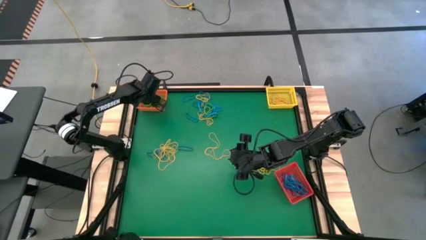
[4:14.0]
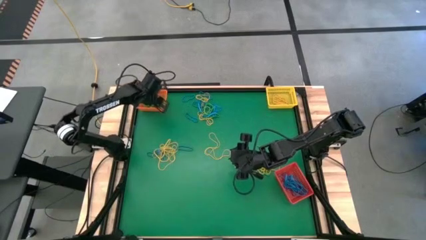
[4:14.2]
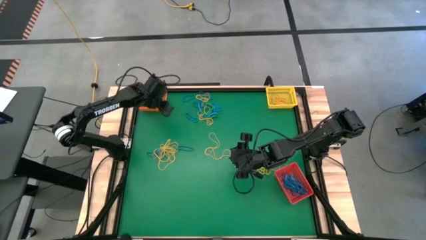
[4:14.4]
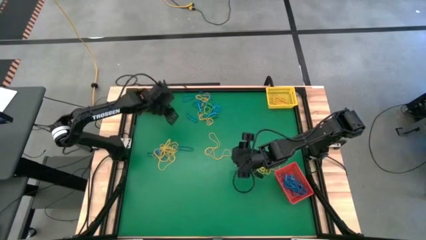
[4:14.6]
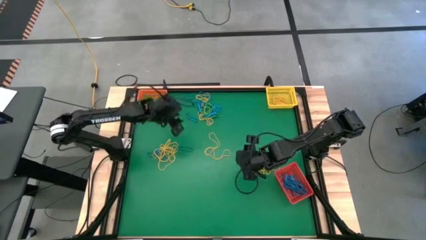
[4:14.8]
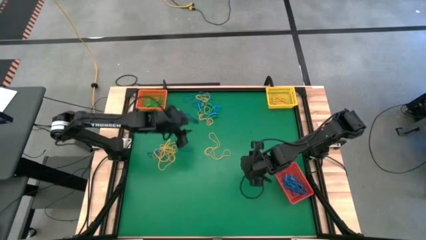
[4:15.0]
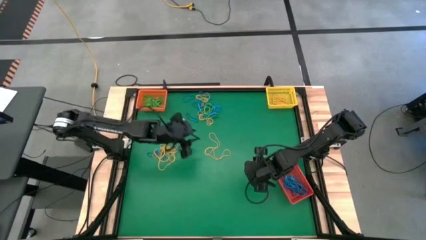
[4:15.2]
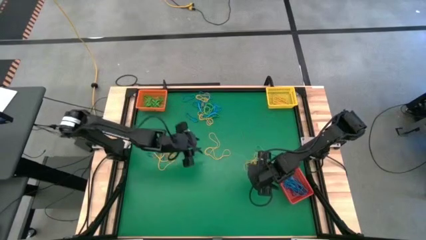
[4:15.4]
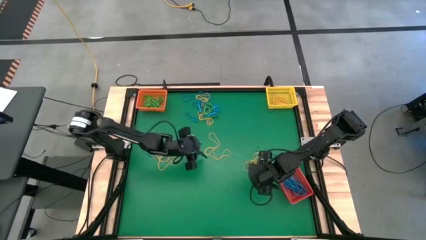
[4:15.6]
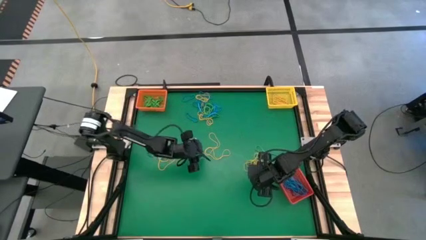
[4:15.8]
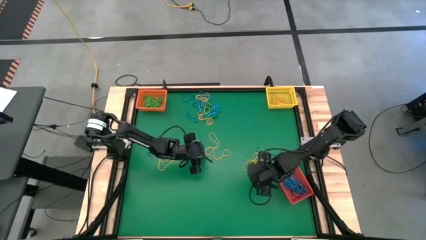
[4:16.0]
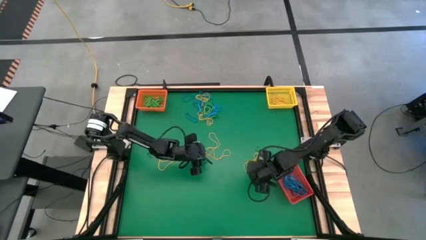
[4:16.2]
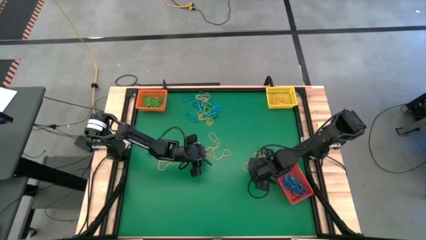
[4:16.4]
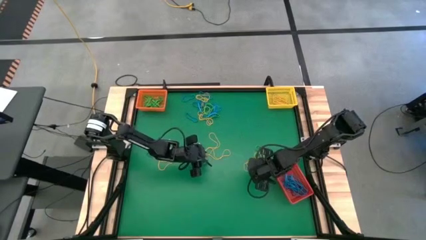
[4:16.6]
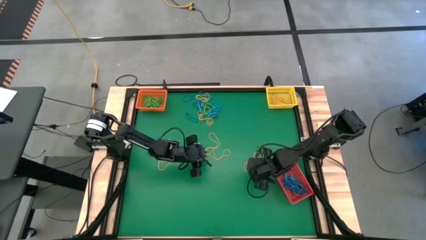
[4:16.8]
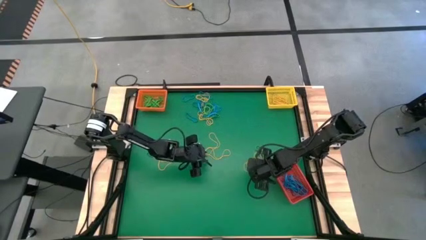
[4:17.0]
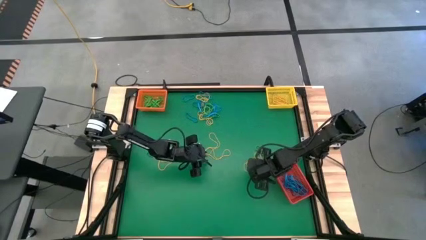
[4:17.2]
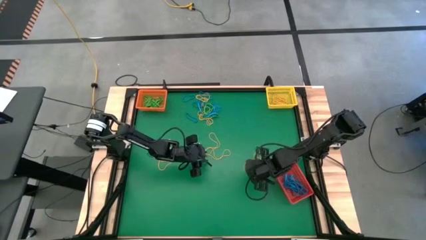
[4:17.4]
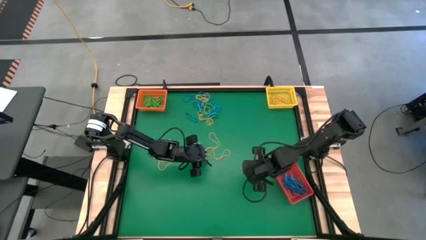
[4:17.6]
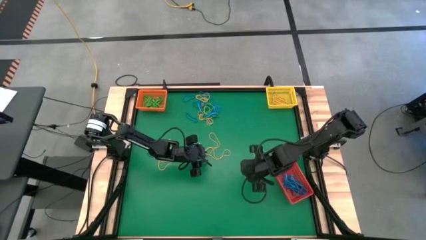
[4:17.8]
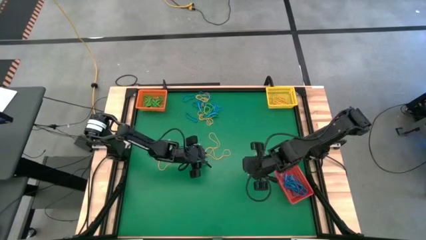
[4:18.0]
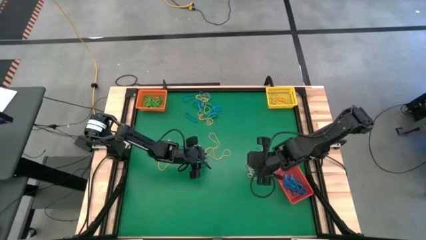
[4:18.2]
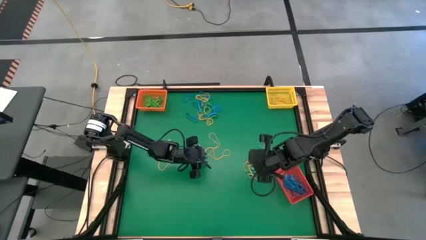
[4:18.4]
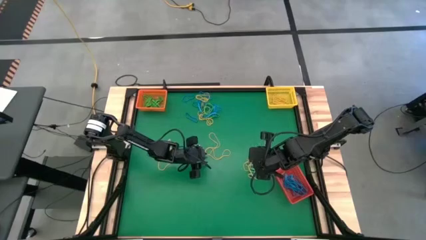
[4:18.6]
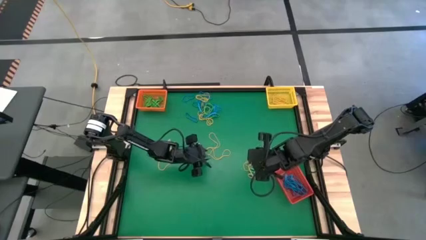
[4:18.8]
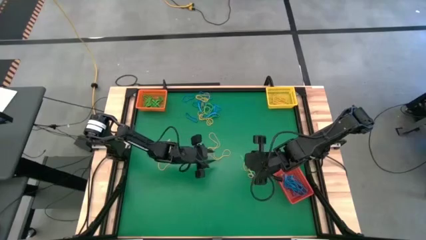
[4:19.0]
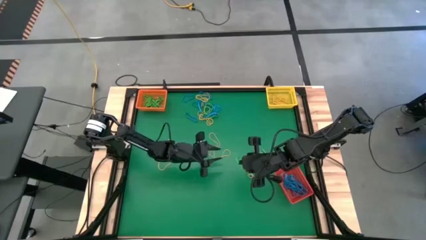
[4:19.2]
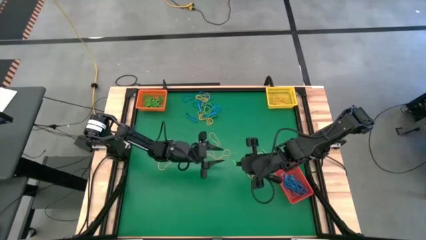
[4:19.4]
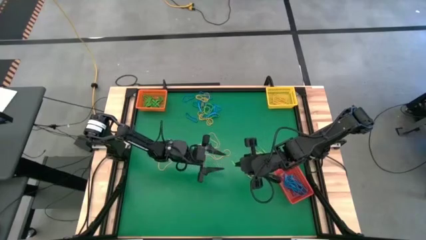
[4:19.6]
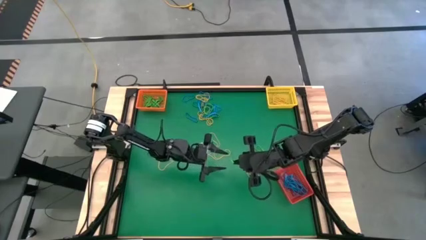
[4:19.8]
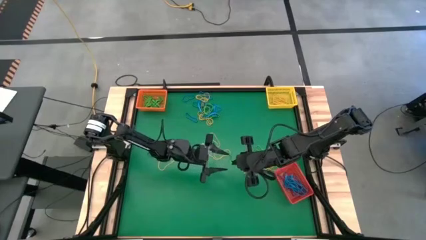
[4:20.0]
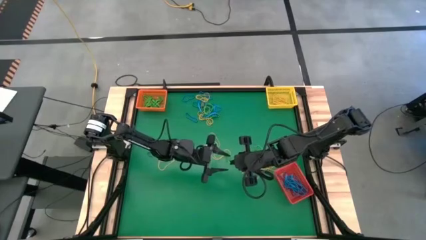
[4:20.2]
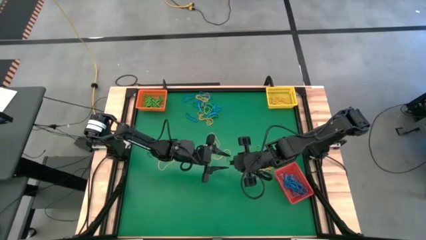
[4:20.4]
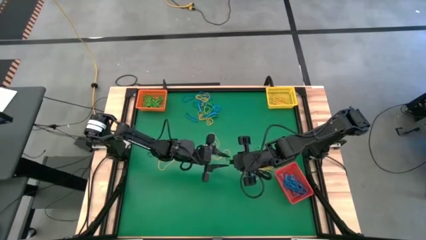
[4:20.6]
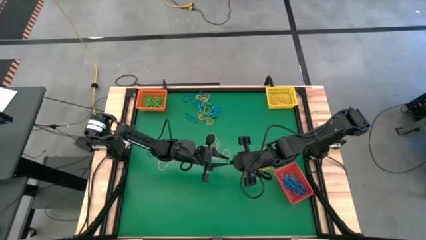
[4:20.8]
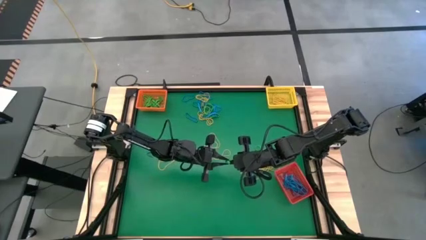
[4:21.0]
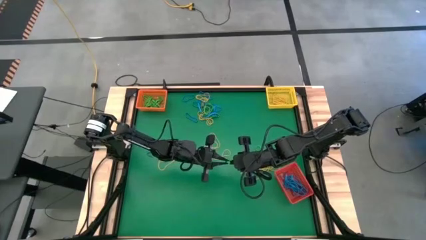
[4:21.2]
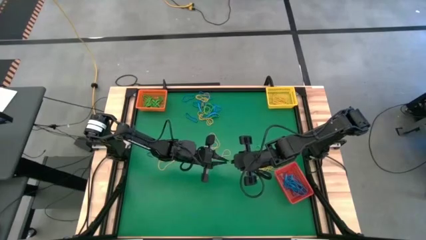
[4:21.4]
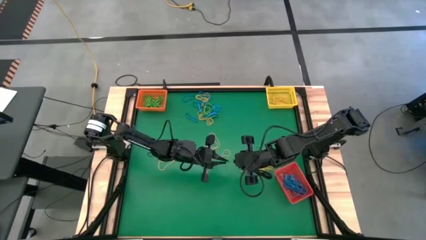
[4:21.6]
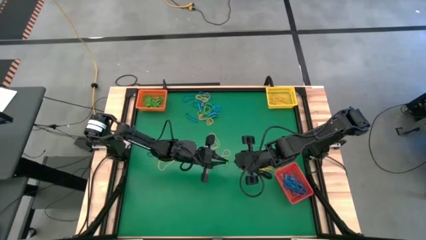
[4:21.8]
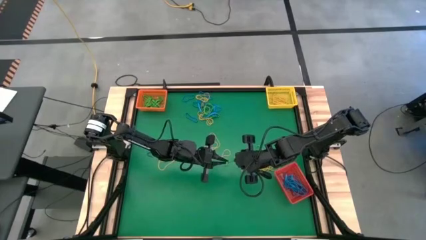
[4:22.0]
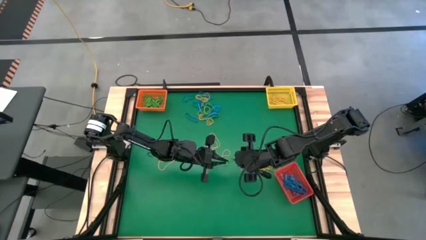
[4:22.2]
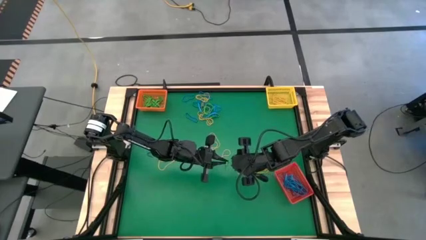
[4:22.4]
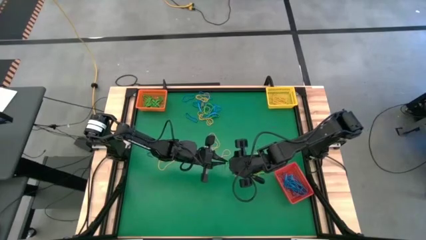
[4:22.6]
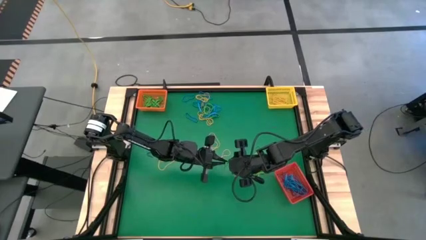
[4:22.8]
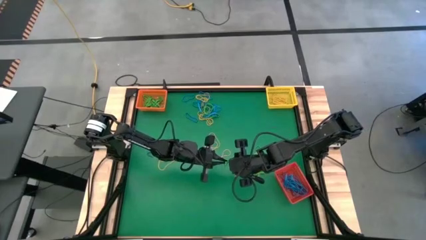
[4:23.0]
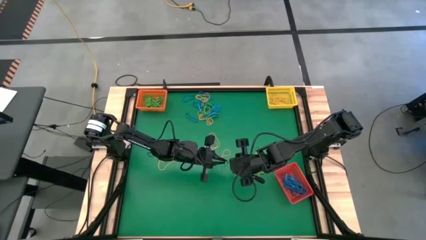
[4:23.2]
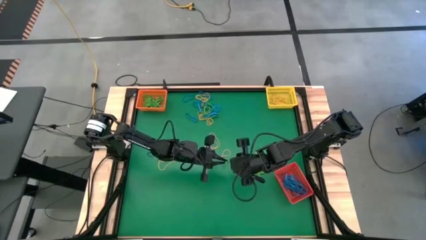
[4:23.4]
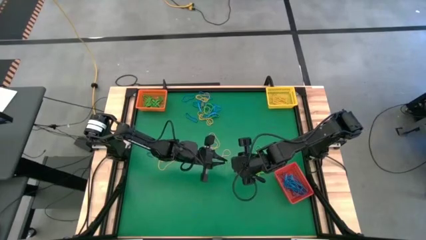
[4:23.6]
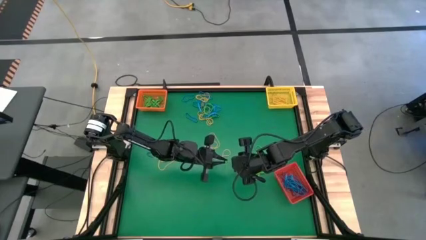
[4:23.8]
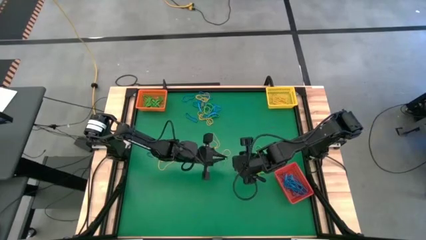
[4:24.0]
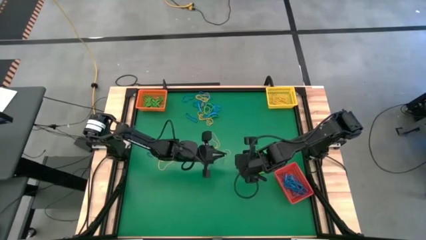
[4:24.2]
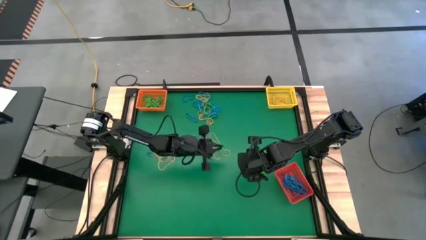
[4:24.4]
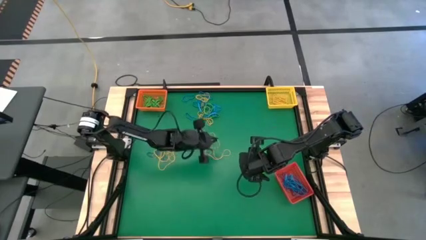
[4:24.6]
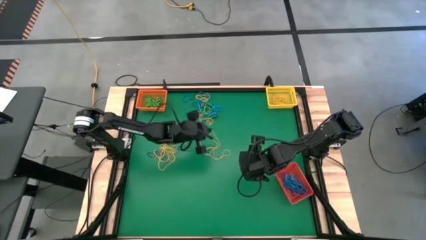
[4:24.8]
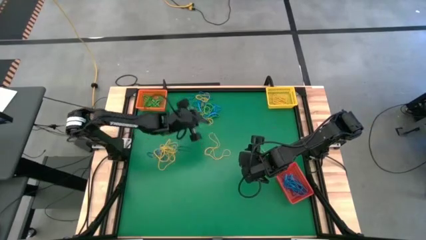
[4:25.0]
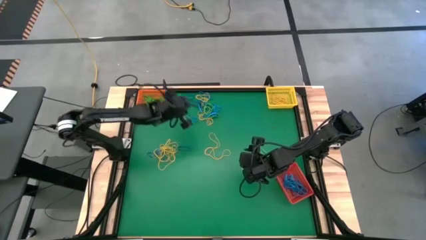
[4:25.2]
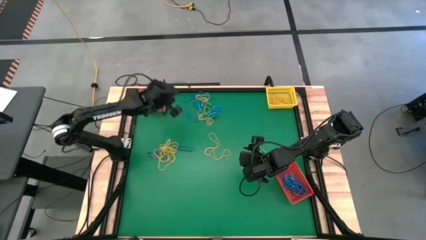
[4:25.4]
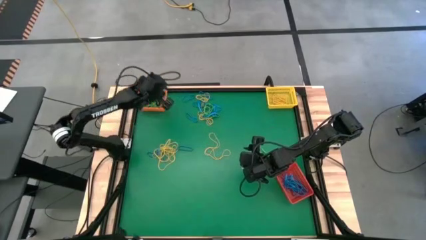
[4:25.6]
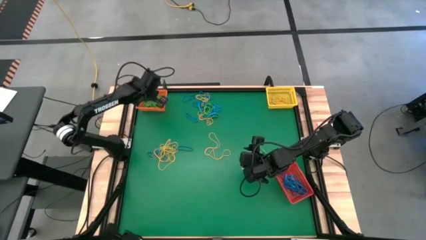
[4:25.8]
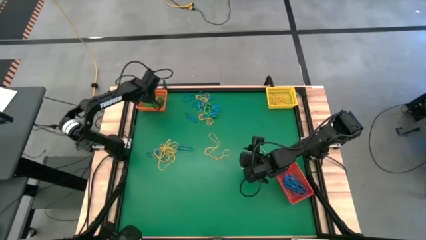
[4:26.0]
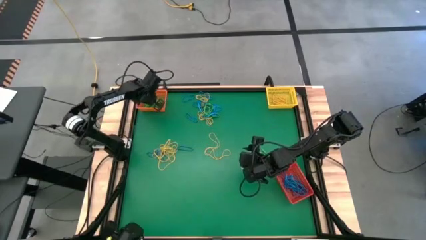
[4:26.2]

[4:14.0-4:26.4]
Task: Sort rubber bands into baskets
Put the green rubber band into the orange bin

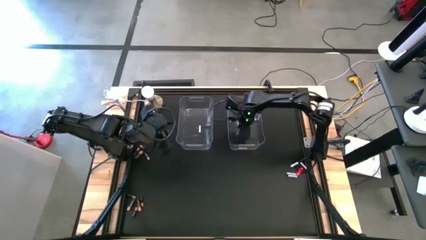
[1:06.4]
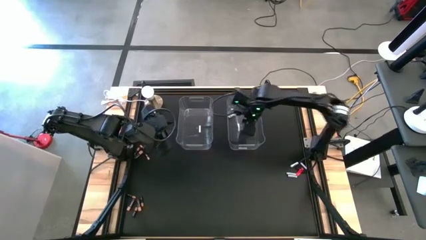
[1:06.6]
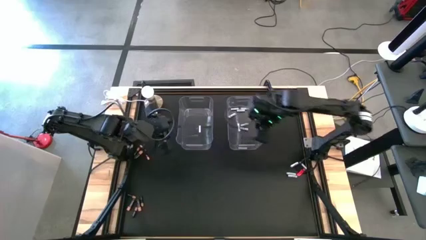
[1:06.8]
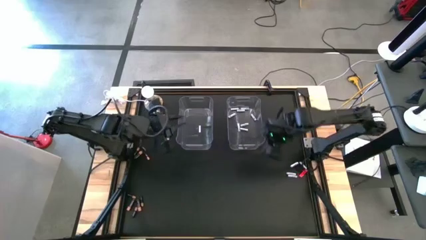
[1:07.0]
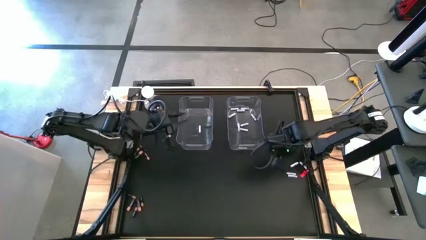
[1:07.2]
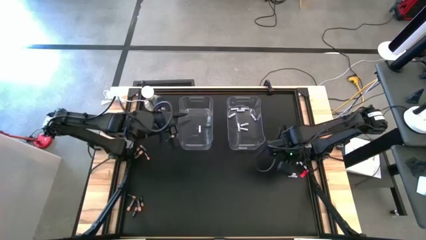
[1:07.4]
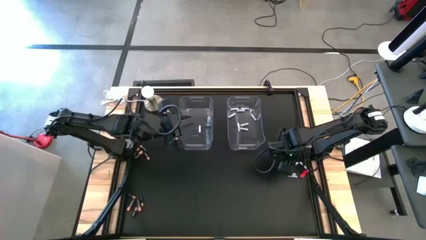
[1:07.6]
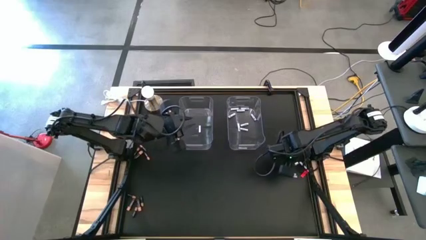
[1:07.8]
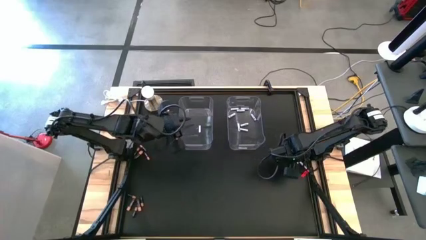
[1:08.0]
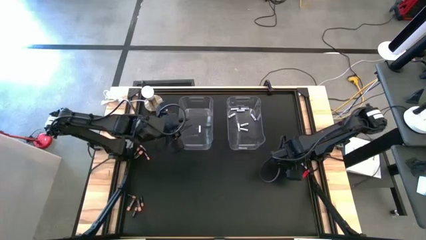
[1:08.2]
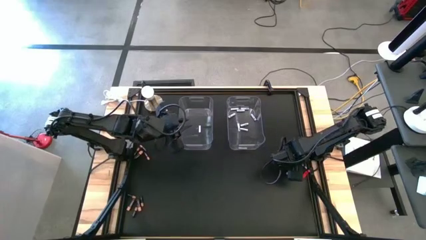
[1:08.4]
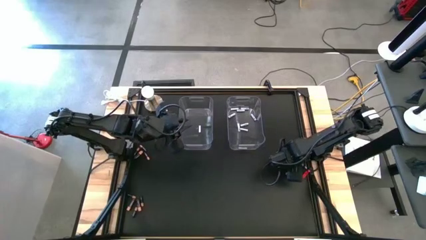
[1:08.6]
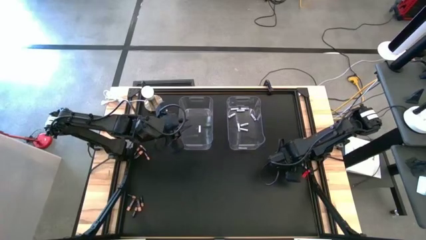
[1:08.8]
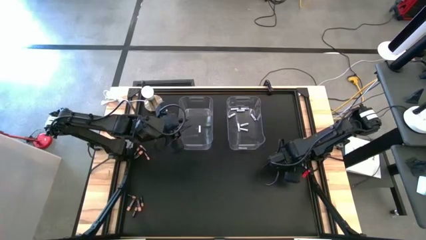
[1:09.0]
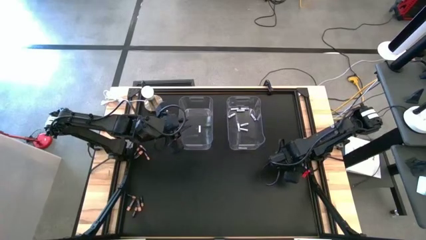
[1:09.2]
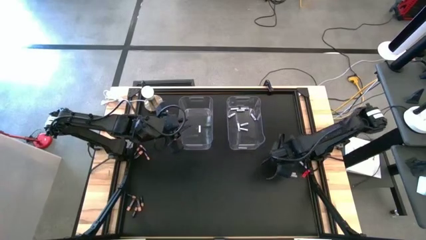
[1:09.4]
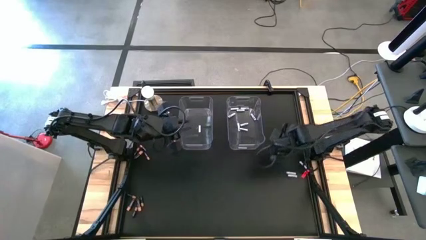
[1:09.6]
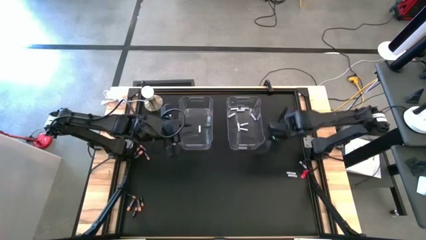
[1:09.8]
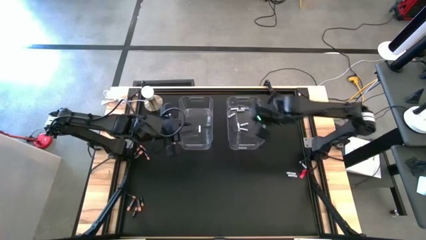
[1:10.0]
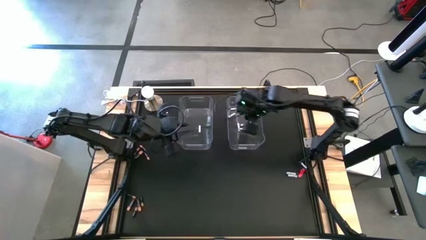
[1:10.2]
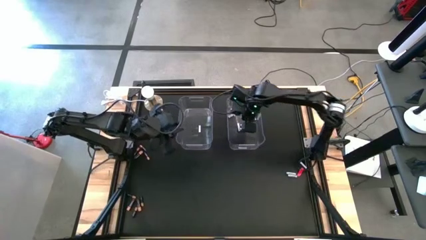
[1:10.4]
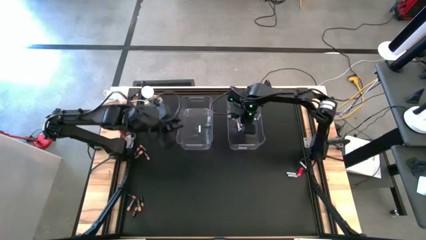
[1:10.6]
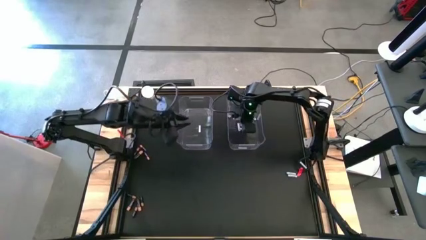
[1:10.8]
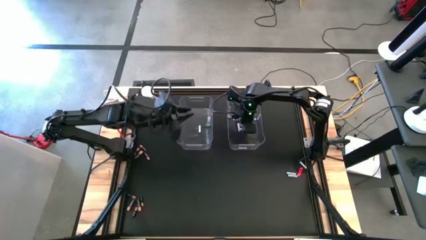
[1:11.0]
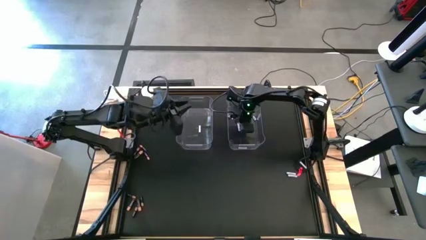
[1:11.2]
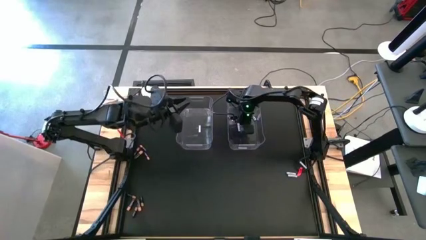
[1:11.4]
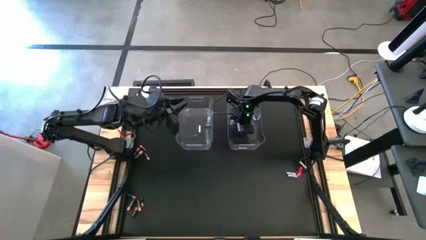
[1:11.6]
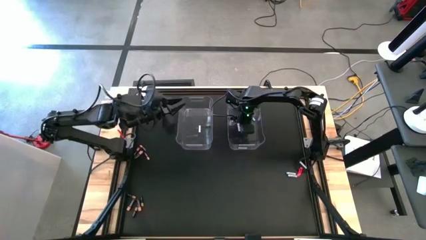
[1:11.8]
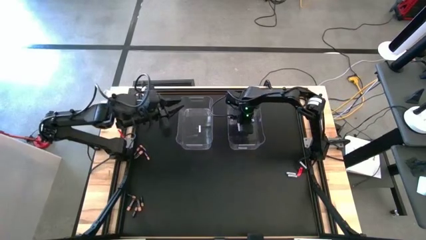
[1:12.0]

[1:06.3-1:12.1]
Task: Sort batteries
Put the white battery into the right transparent bin
